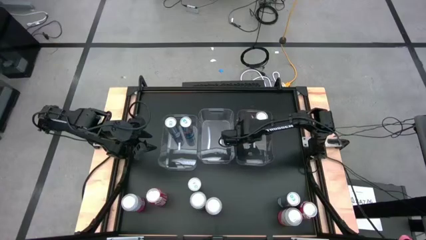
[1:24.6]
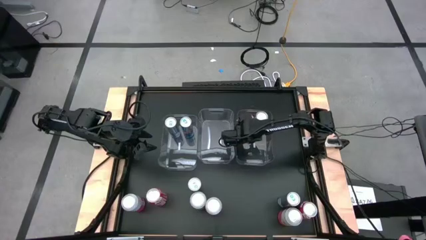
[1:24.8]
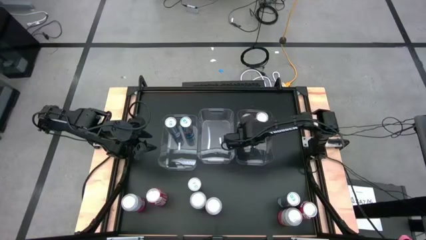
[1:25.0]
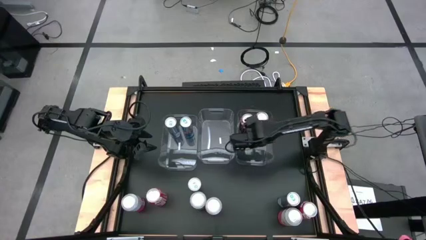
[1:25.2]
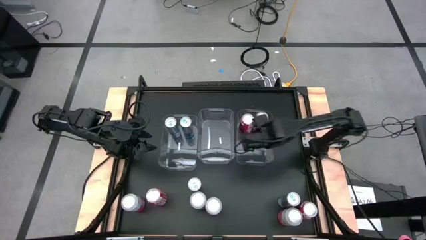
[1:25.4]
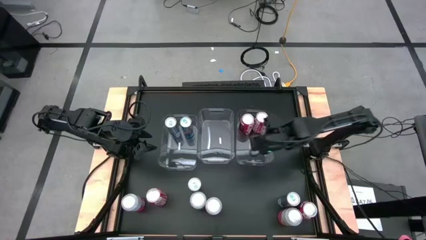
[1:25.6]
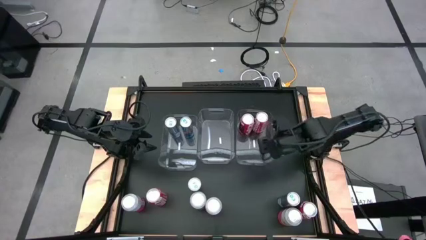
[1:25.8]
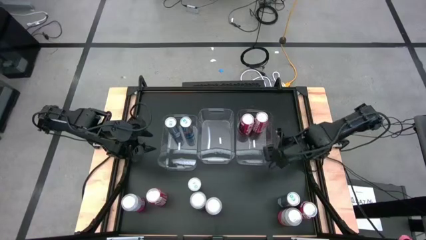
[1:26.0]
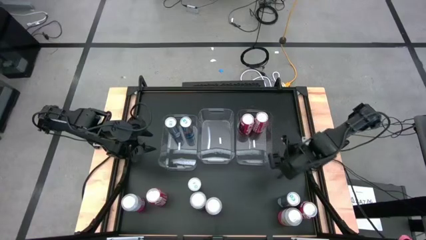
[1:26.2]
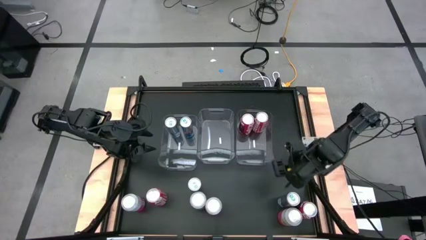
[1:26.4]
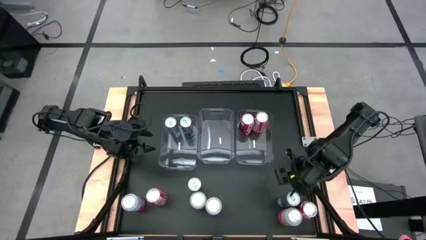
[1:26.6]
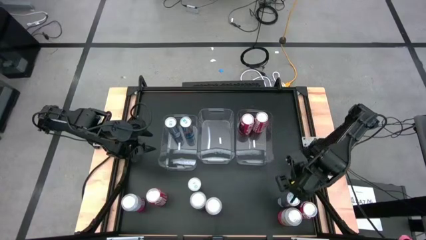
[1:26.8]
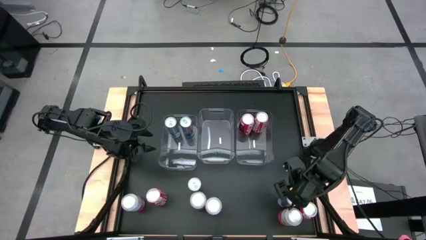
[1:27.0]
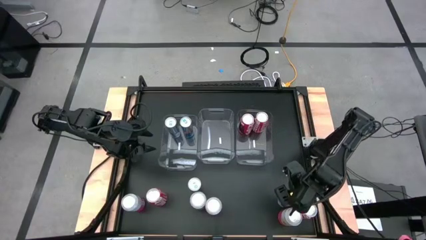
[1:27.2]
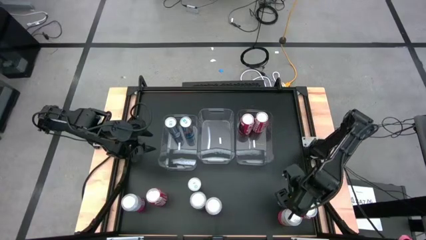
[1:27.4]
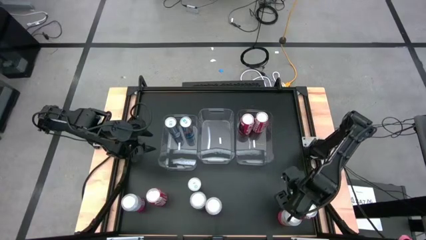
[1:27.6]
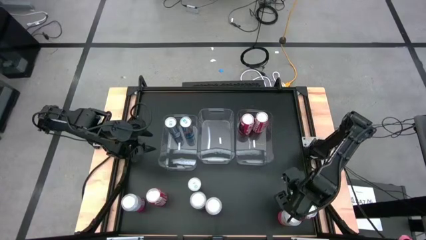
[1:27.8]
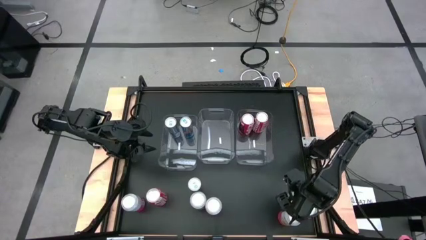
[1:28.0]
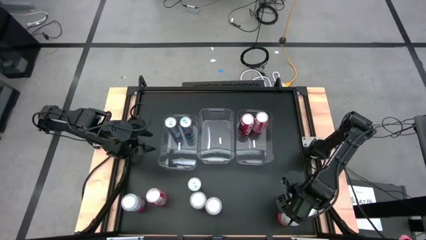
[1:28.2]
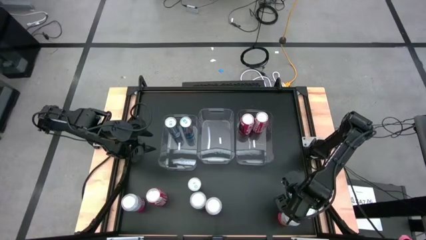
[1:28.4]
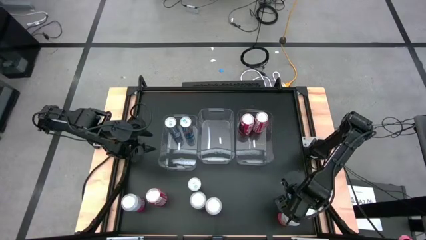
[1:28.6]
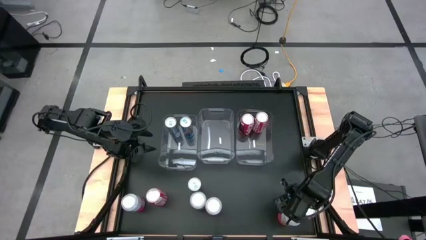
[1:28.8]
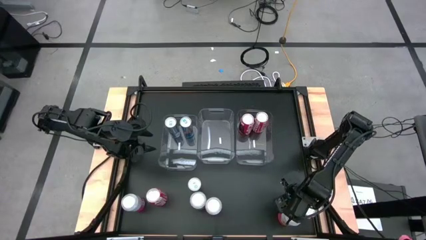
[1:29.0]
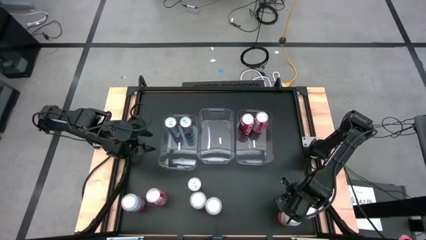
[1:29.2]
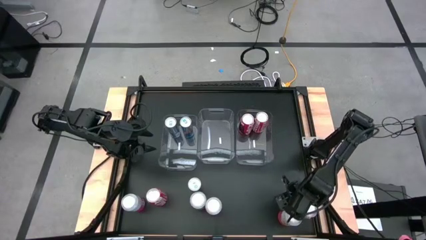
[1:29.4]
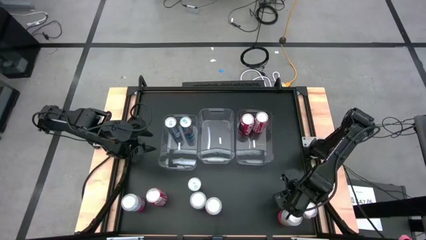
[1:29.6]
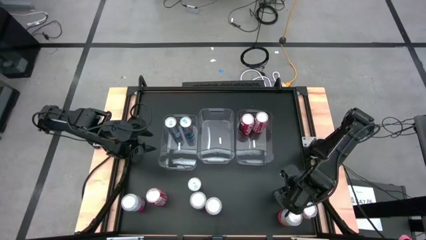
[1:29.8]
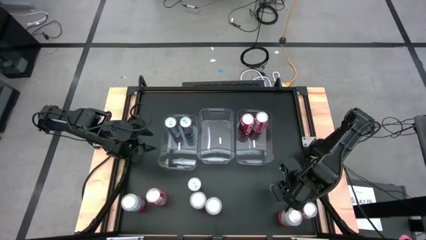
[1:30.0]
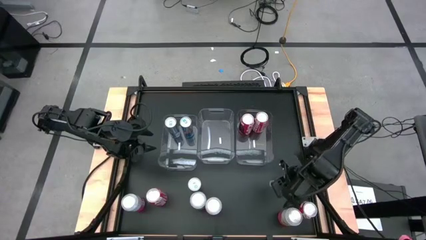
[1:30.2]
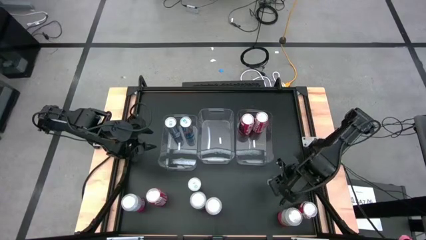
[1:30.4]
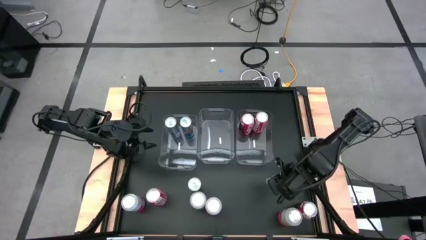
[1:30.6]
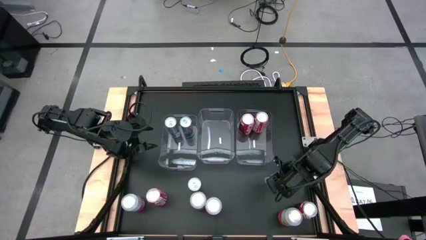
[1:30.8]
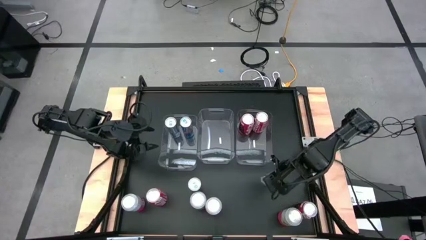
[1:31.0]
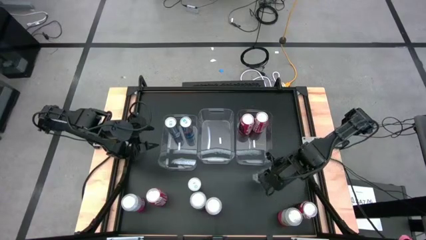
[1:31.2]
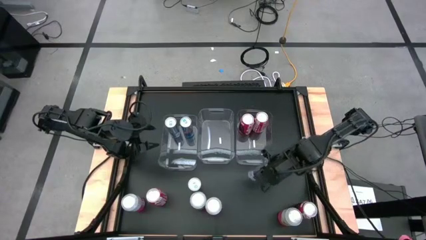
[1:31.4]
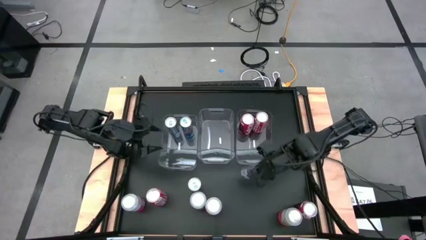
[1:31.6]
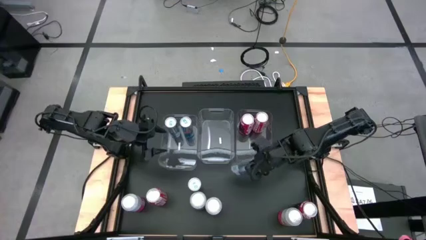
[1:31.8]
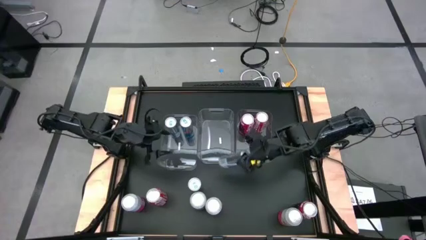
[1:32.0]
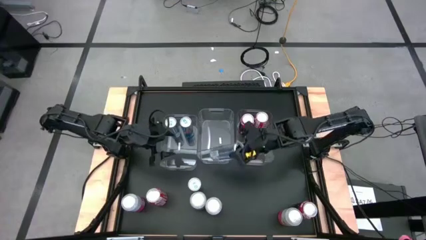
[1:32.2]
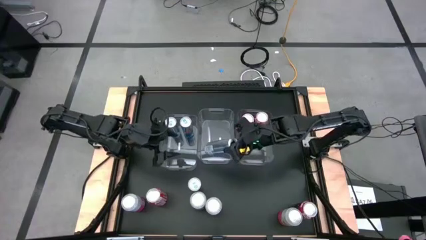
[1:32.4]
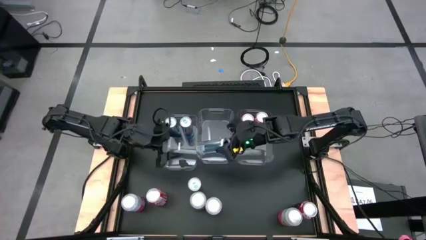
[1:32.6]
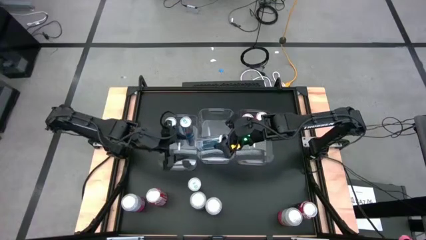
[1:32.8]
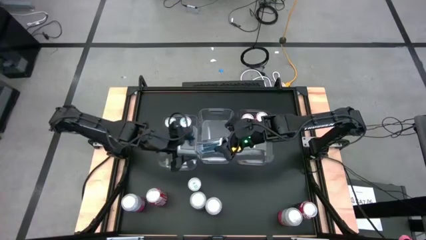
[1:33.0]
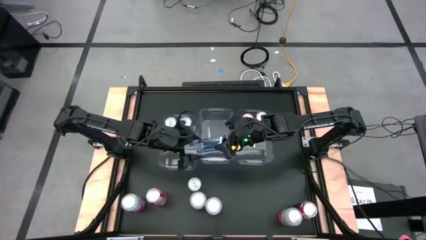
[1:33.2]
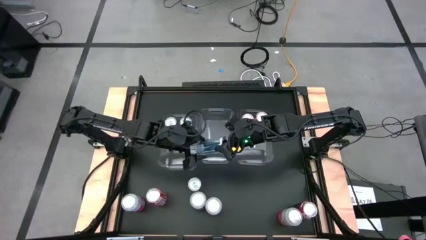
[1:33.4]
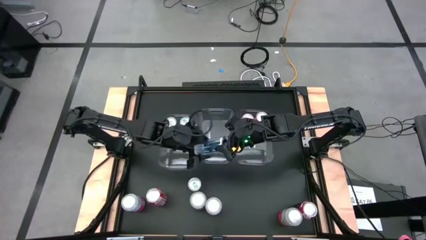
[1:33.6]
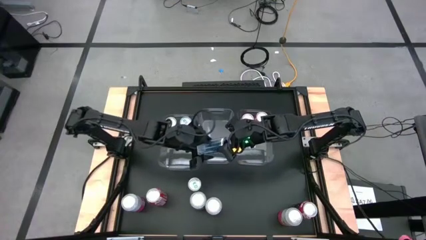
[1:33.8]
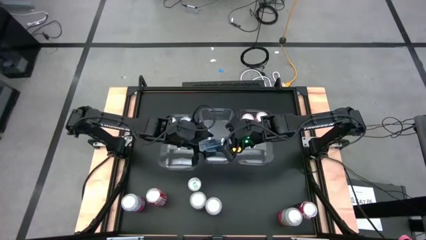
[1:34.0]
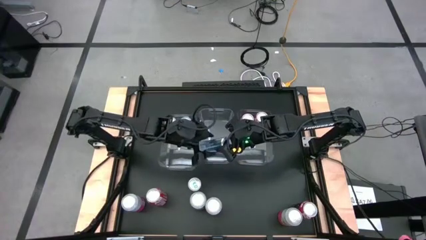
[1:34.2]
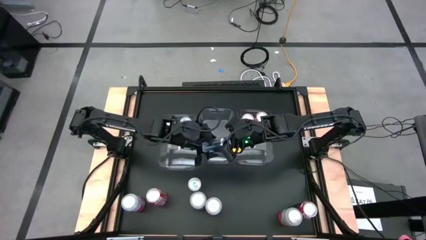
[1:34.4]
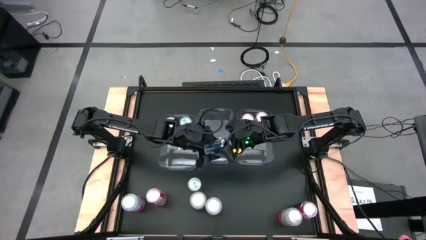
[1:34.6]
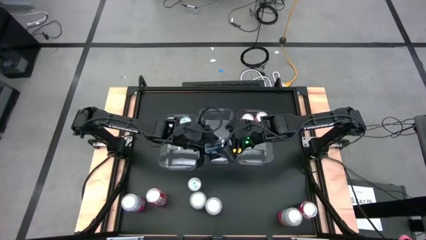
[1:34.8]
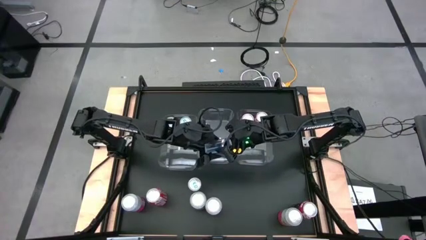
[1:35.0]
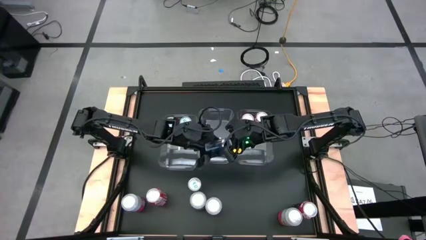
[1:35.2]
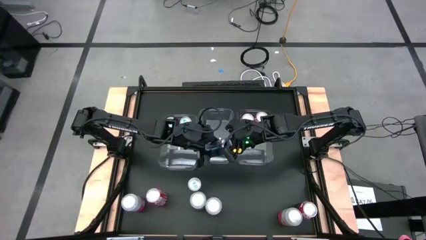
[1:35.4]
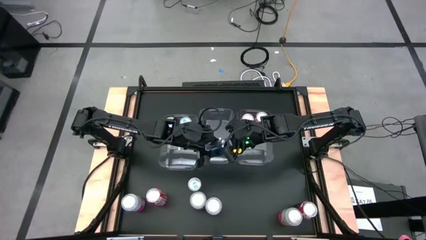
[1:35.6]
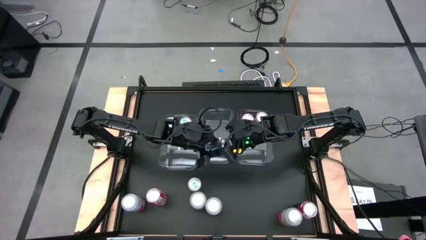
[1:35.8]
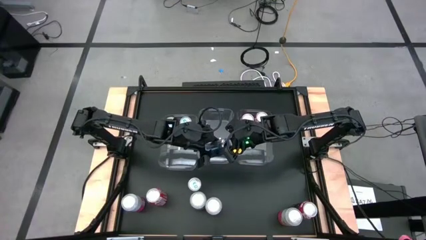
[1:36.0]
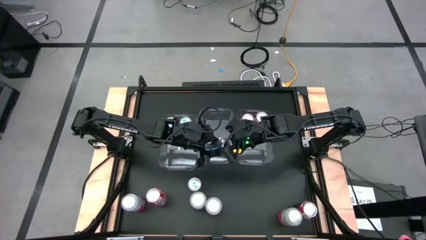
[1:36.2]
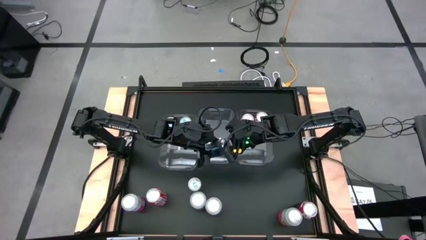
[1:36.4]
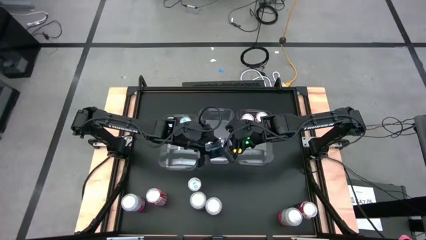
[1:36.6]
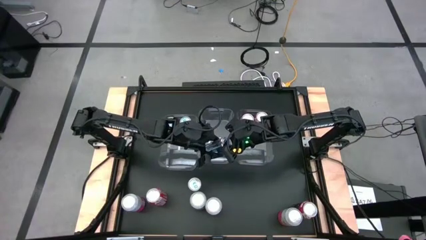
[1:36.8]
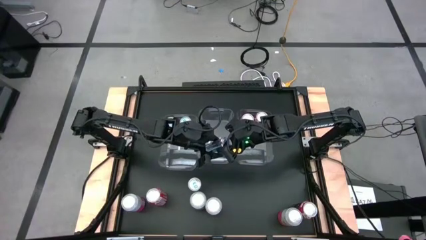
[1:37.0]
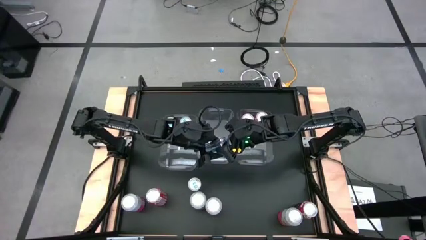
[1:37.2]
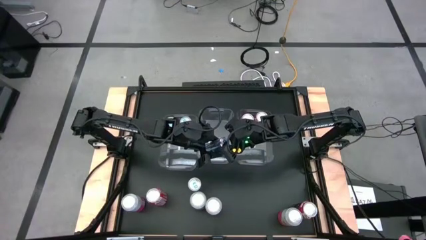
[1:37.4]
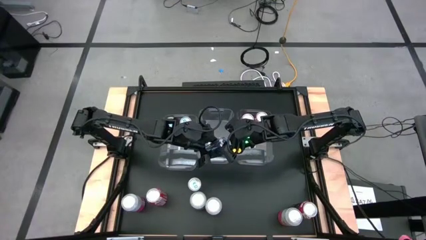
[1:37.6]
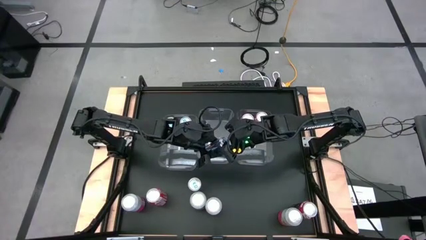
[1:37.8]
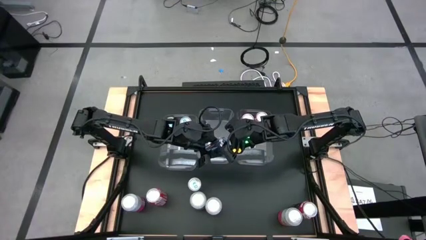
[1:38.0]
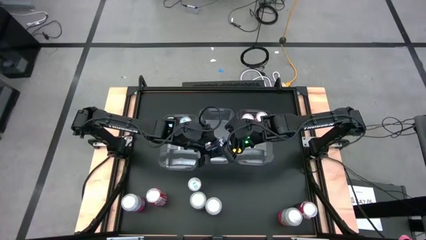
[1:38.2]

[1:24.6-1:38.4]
Task: Sort soda cans
Put the bottom right blue soda can into the left transparent bin

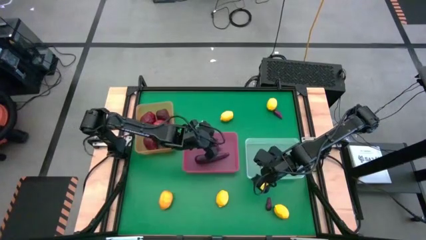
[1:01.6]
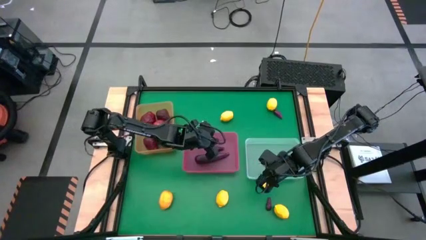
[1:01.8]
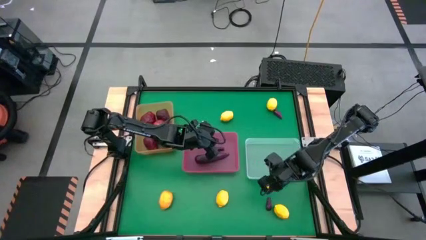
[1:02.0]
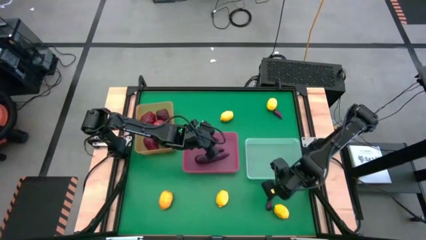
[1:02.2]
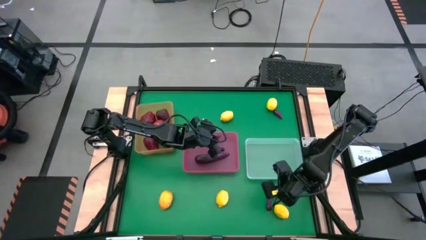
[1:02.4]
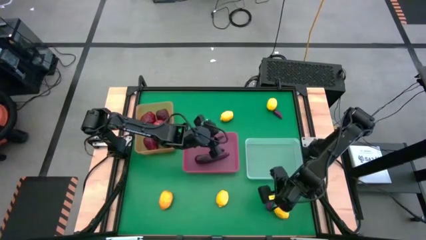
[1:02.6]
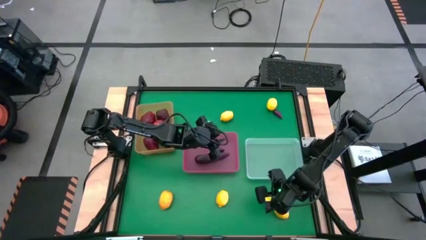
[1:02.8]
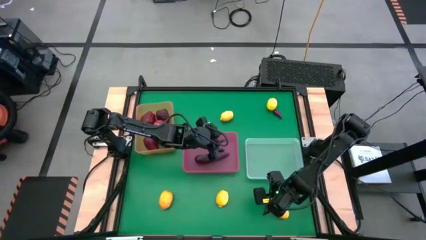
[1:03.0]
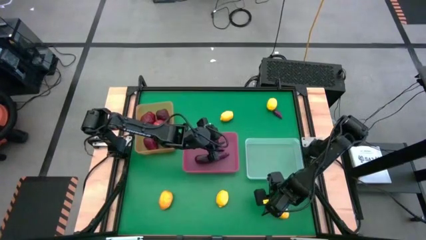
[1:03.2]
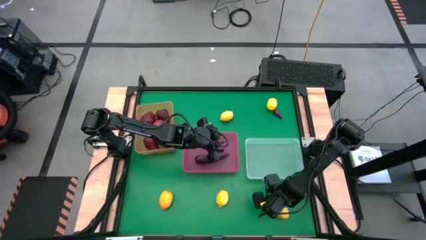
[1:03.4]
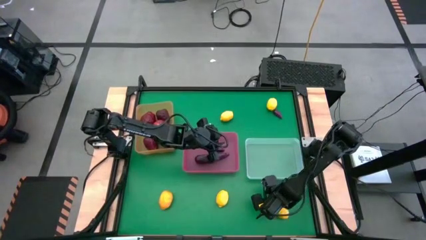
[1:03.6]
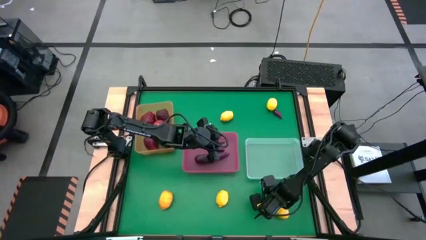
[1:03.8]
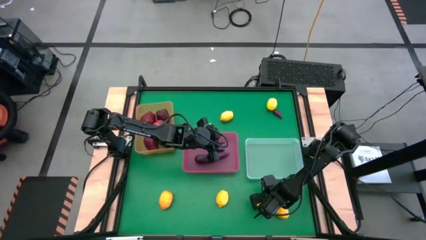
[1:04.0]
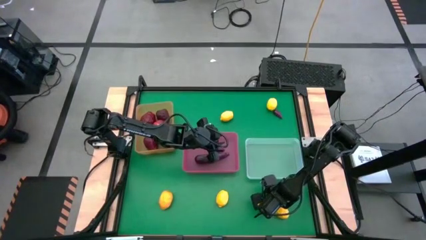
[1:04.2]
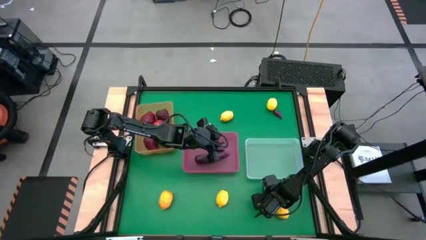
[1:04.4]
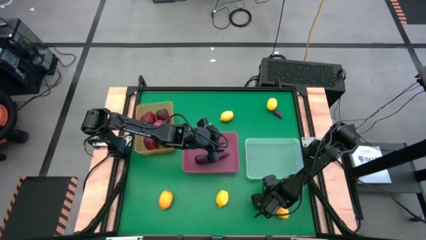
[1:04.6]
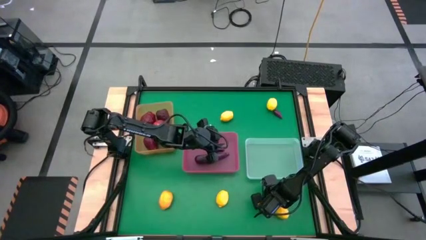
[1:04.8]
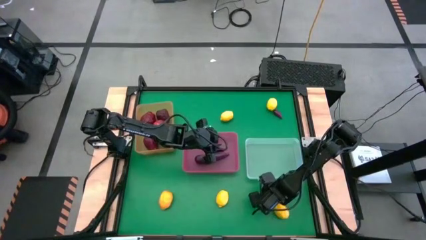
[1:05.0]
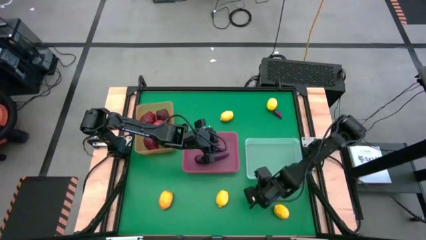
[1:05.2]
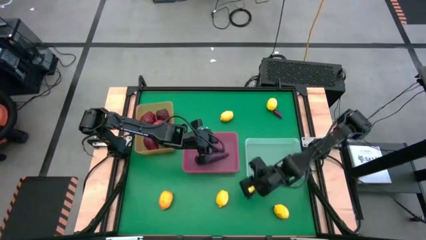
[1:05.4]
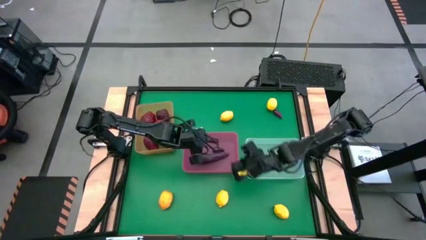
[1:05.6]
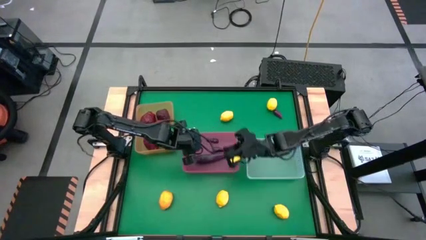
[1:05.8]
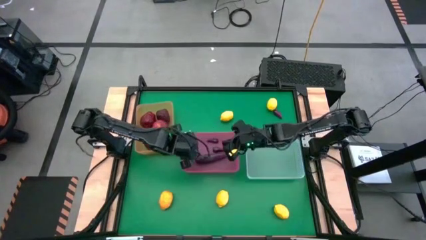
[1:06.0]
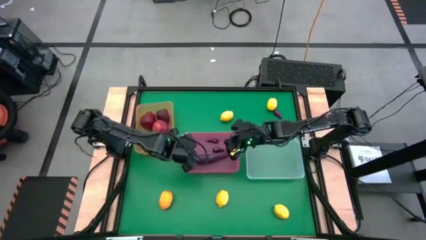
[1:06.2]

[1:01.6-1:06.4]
Task: Sort produce into baskets
Put the violet eggplant into the pink bin
